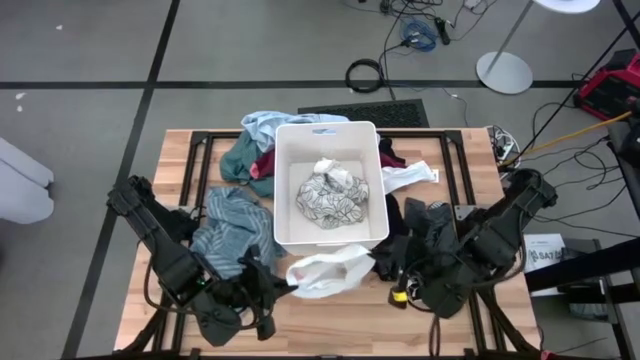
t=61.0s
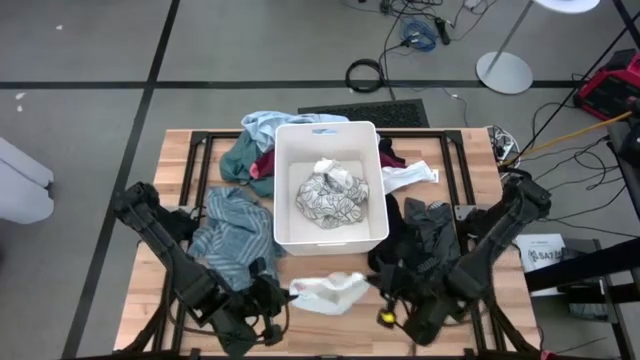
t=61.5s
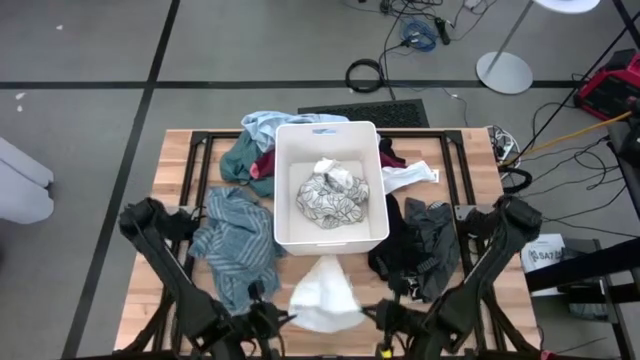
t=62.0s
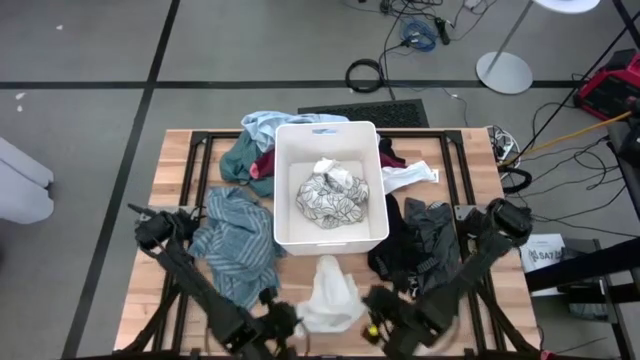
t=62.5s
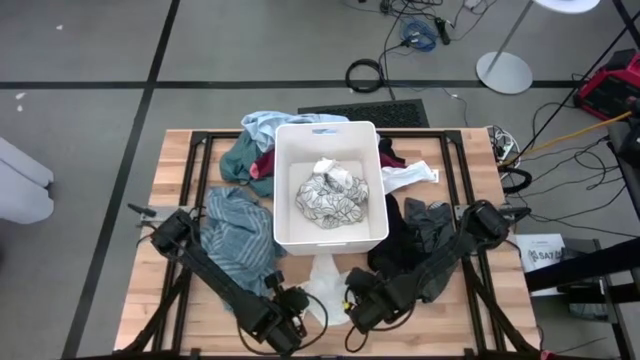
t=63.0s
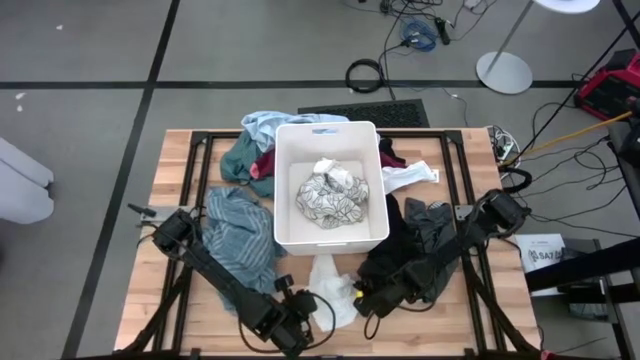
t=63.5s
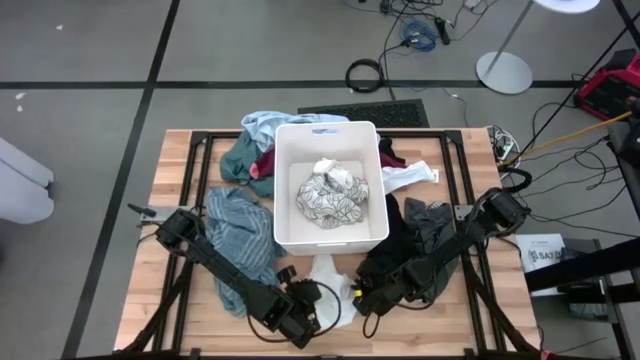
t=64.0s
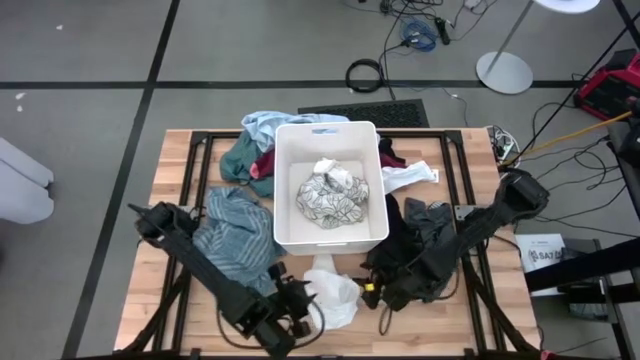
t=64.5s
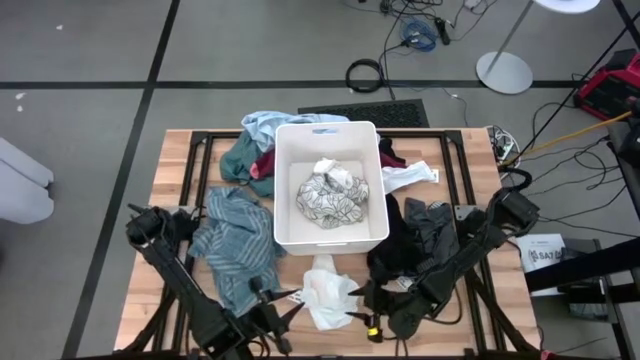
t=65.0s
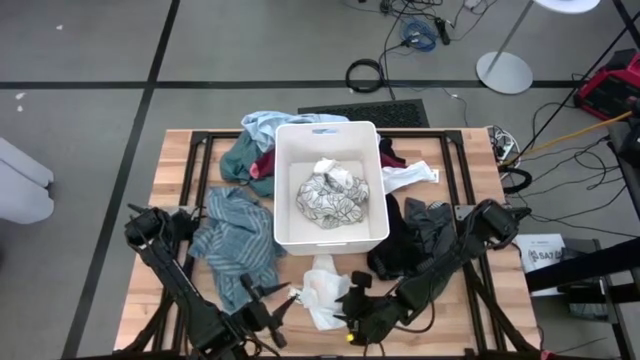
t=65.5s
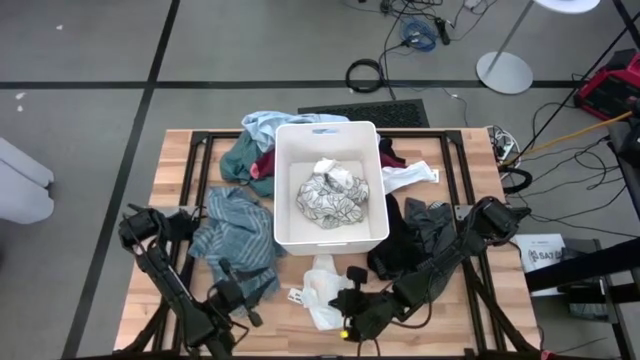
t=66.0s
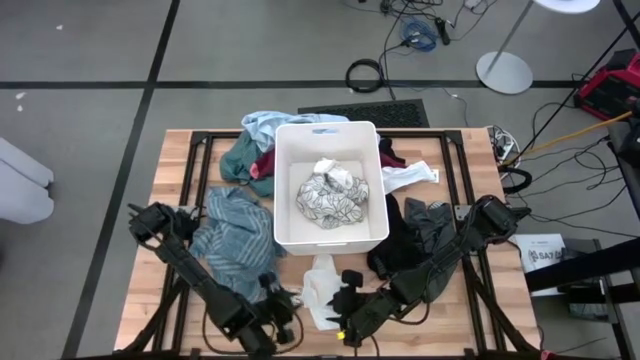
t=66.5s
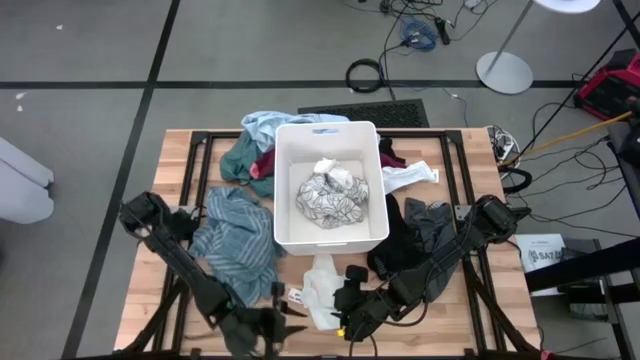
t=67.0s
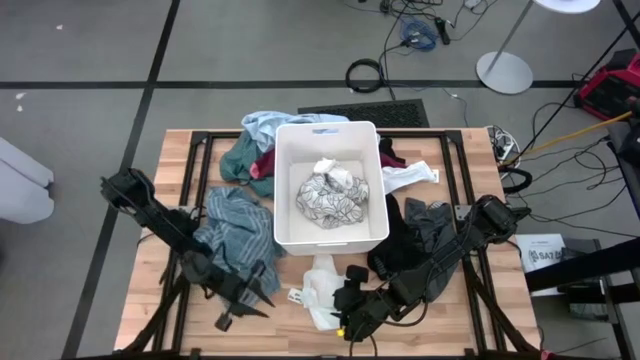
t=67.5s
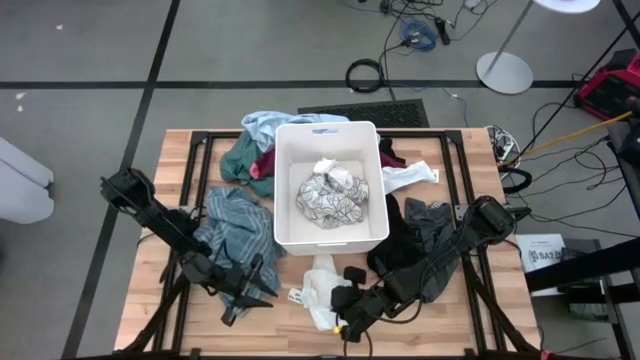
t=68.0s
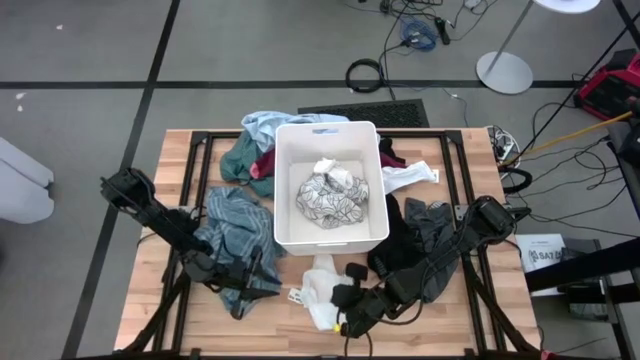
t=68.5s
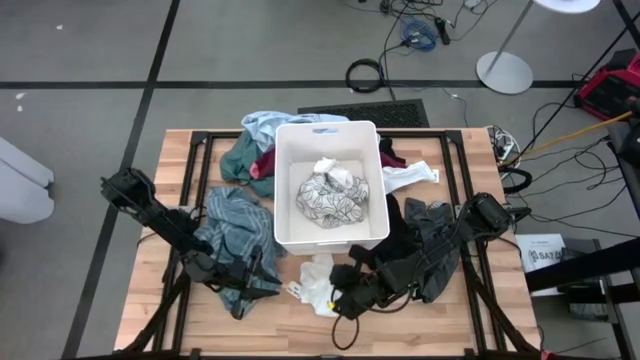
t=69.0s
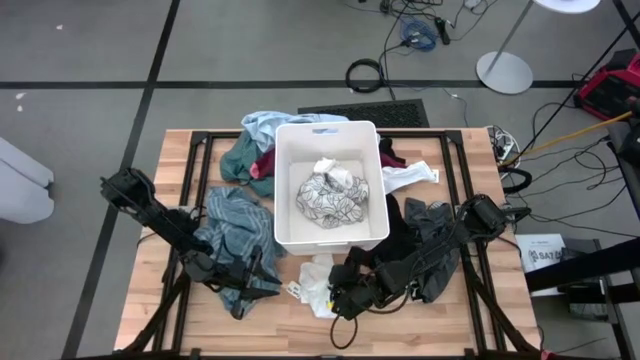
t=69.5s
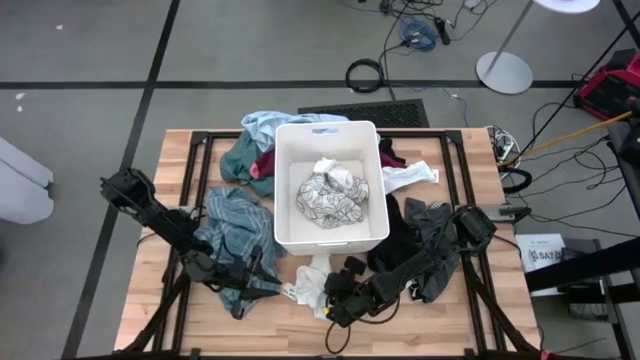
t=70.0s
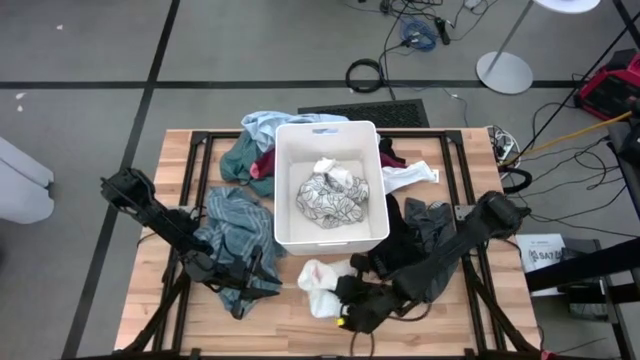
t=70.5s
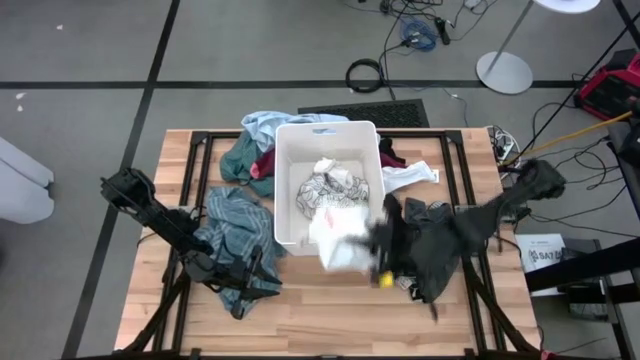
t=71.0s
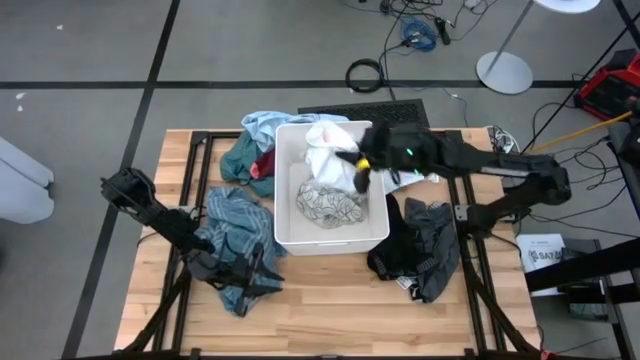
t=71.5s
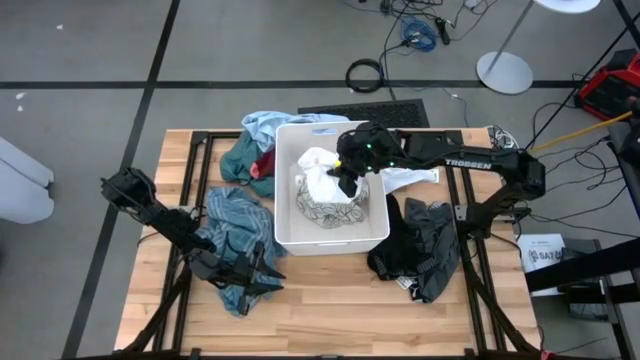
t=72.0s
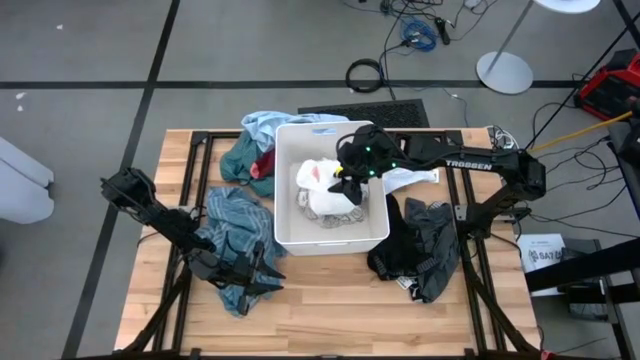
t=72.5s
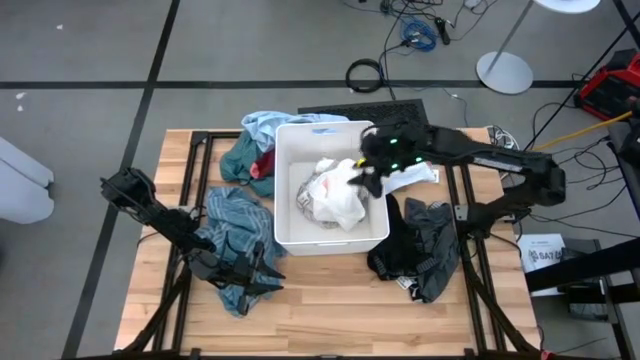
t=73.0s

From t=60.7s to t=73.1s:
Task: Sort clothes
Put the white short into the white laundry organizer

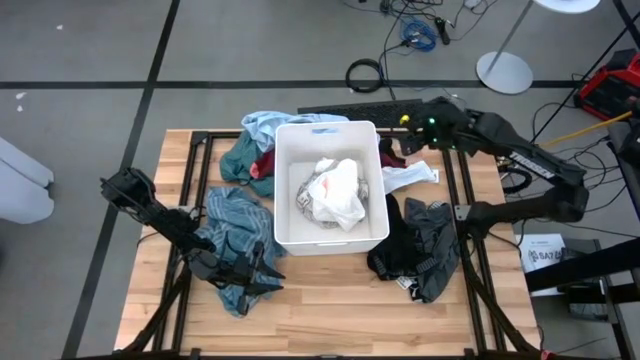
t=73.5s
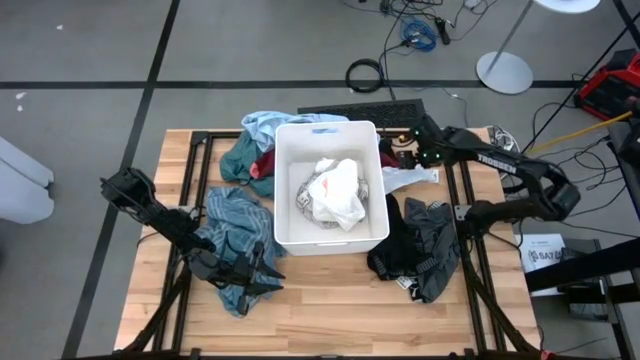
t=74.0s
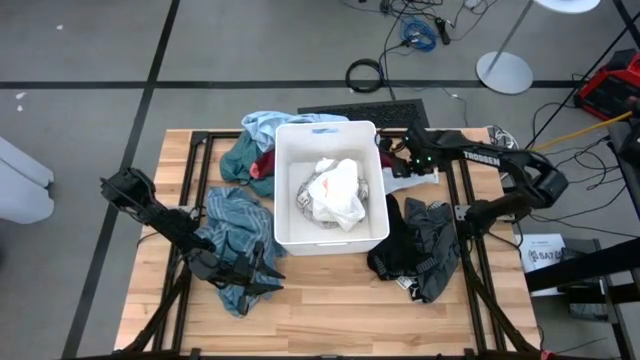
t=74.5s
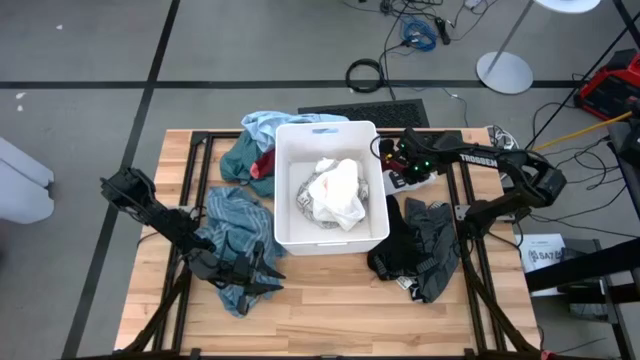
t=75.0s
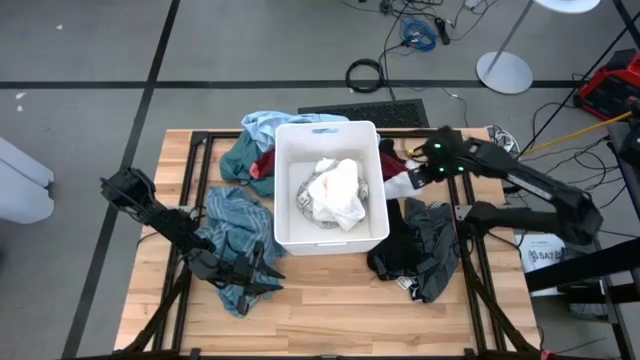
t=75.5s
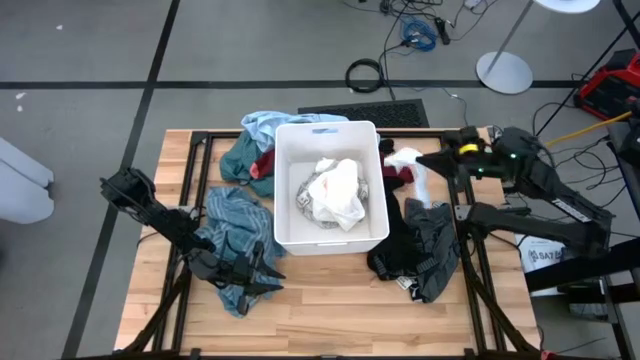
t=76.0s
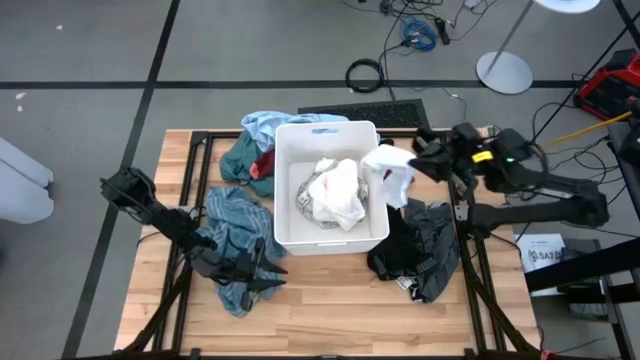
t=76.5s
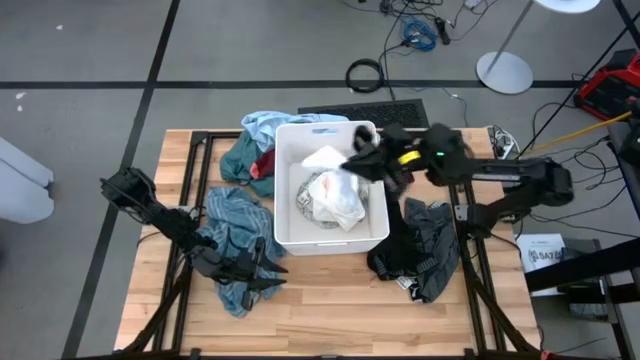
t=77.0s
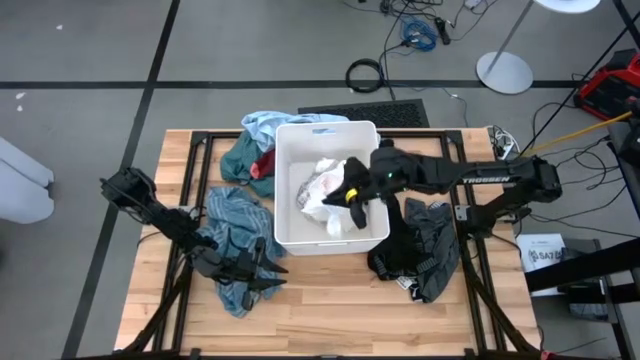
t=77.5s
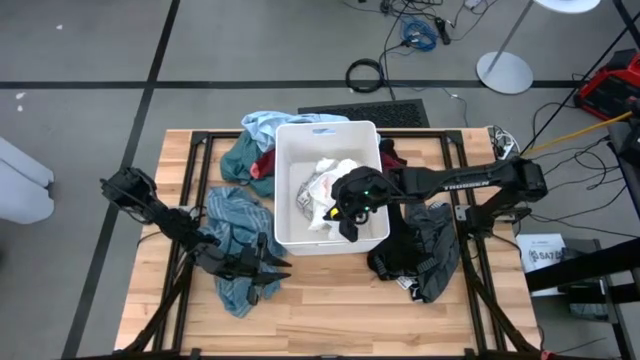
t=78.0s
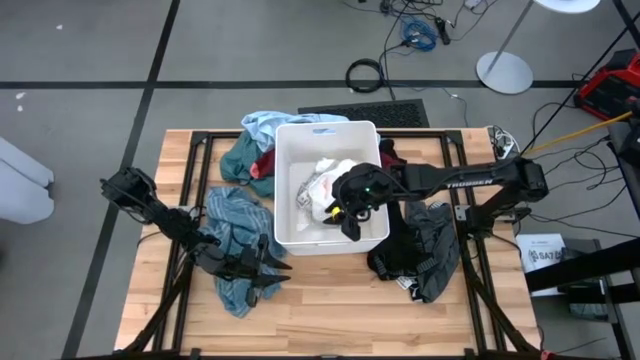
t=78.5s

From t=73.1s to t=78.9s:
Put the white sock into the white laundry organizer

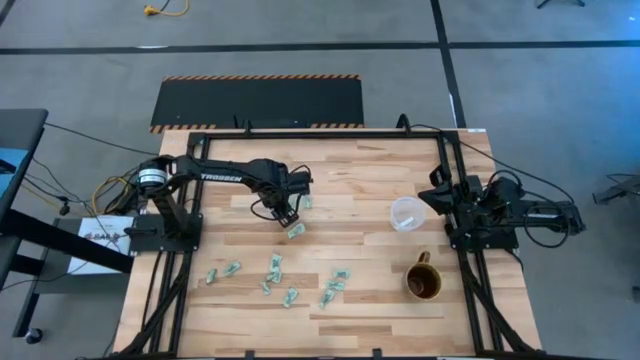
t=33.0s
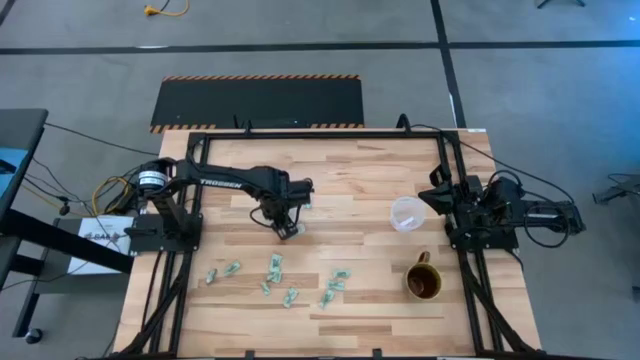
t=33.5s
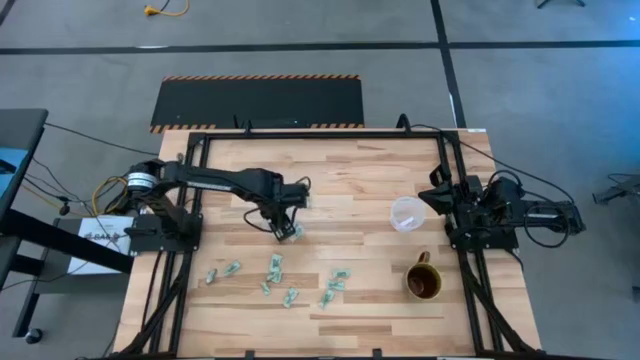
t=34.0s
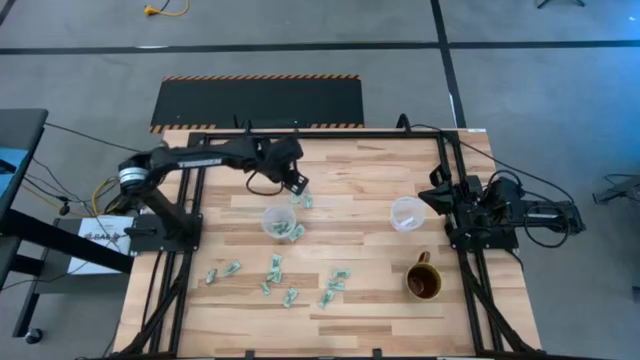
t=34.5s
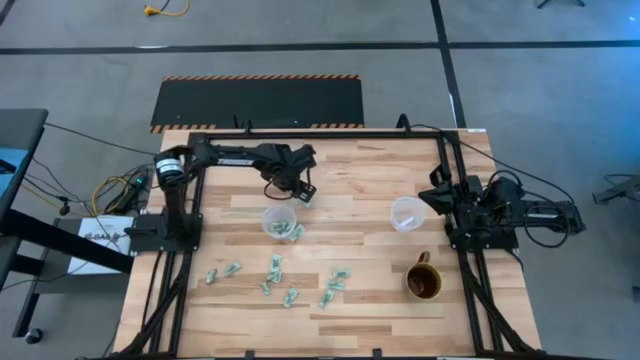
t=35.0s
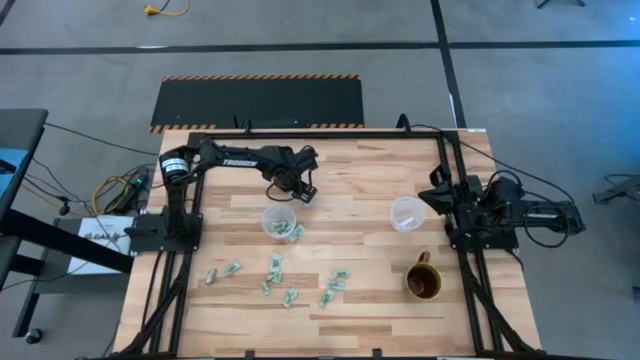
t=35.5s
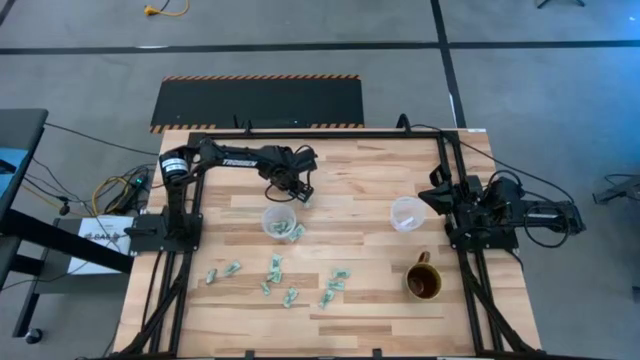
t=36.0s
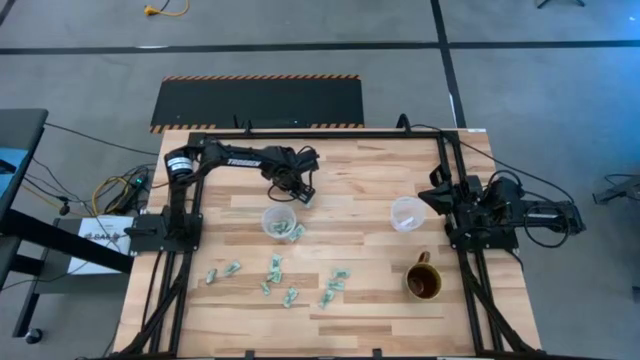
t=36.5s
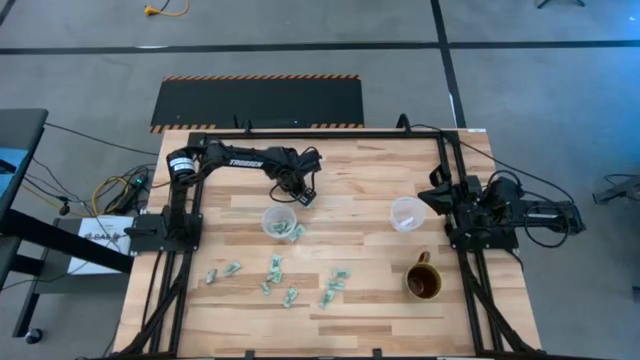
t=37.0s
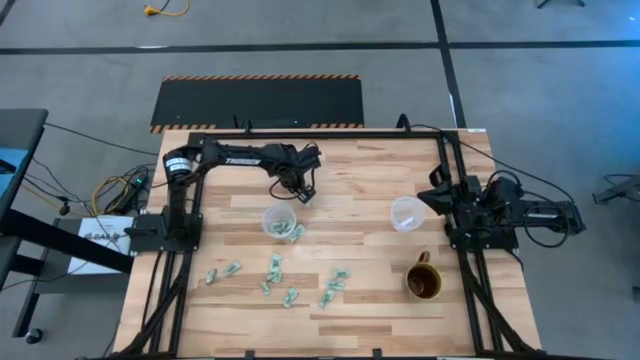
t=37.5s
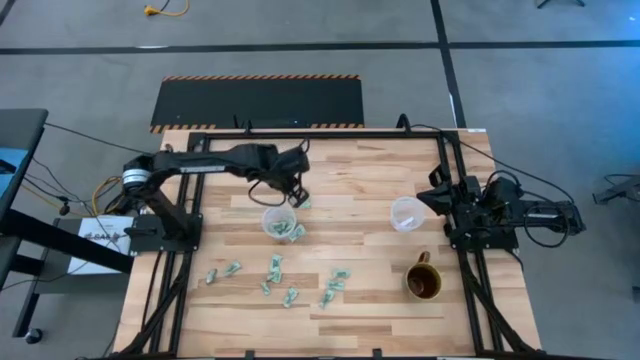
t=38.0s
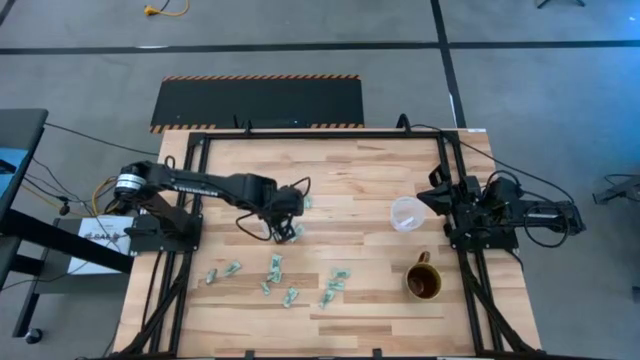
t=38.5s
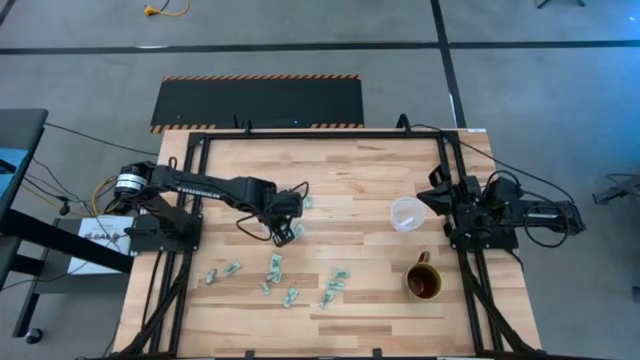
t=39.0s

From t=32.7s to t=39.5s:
Task: Pick and place Stevia / Truvia into bins
Put the white stevia packet into the left transparent container
